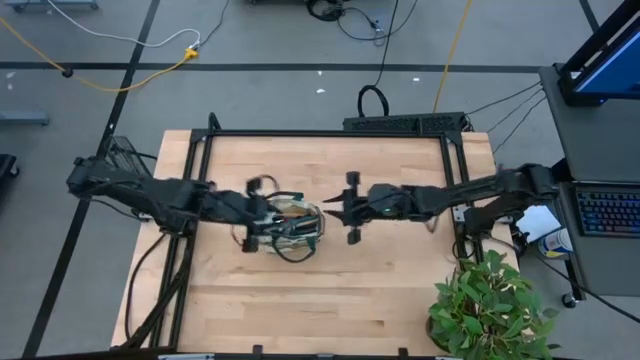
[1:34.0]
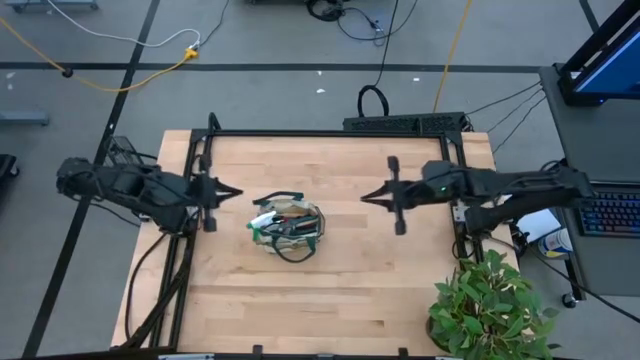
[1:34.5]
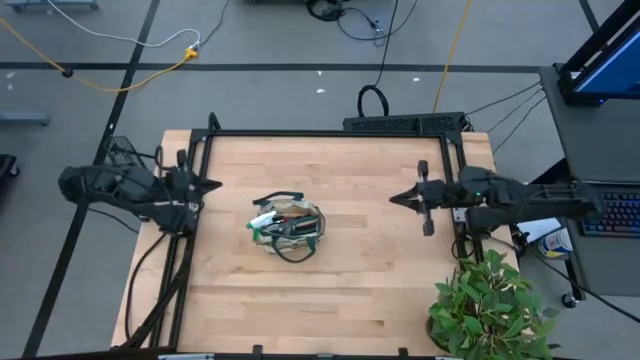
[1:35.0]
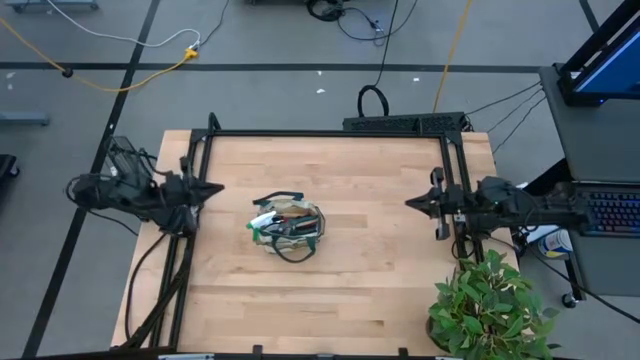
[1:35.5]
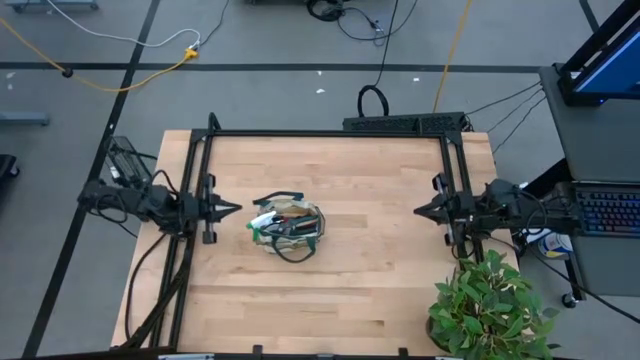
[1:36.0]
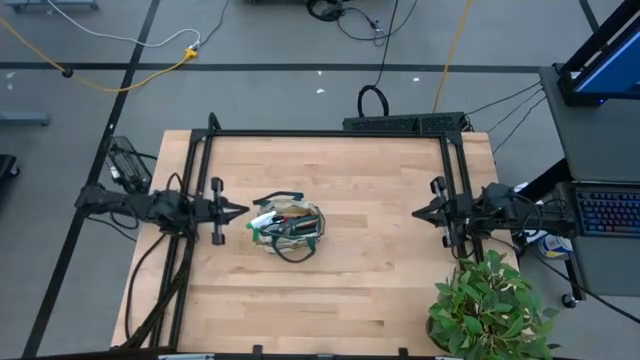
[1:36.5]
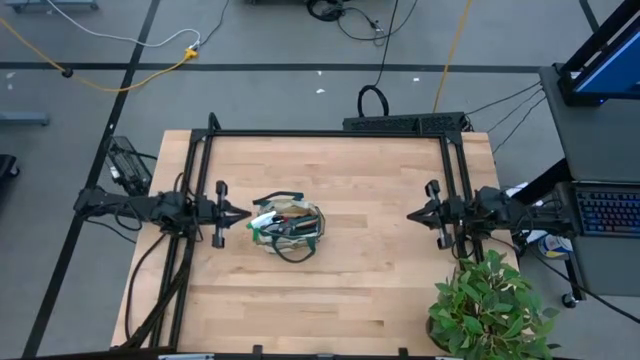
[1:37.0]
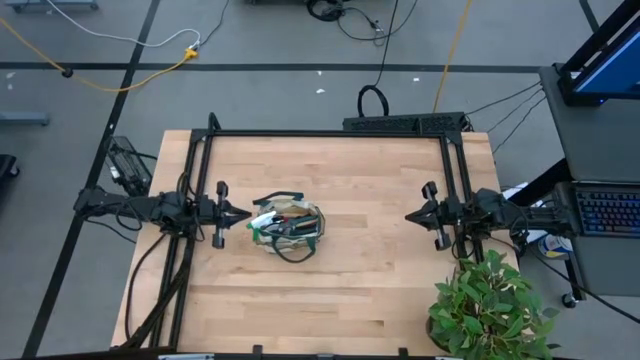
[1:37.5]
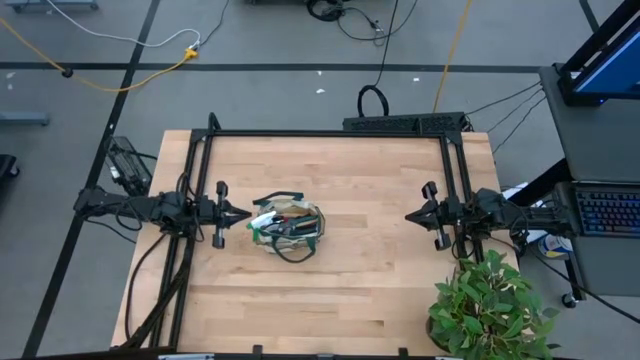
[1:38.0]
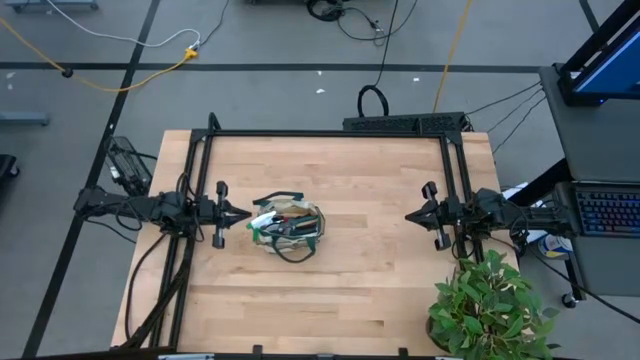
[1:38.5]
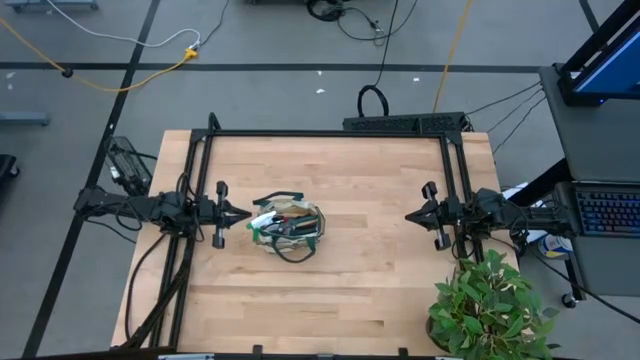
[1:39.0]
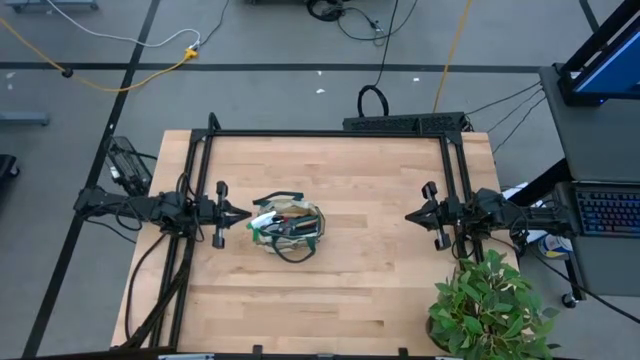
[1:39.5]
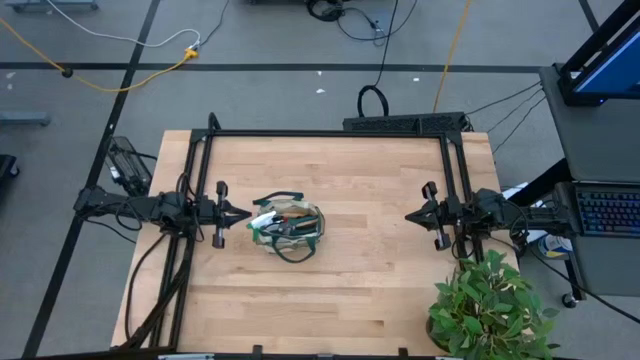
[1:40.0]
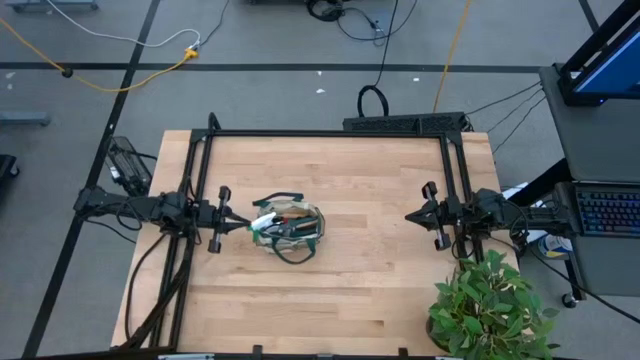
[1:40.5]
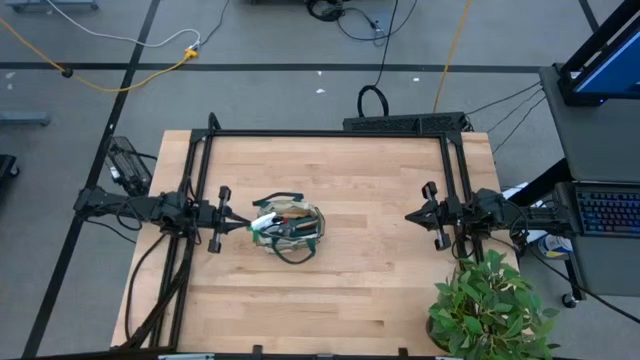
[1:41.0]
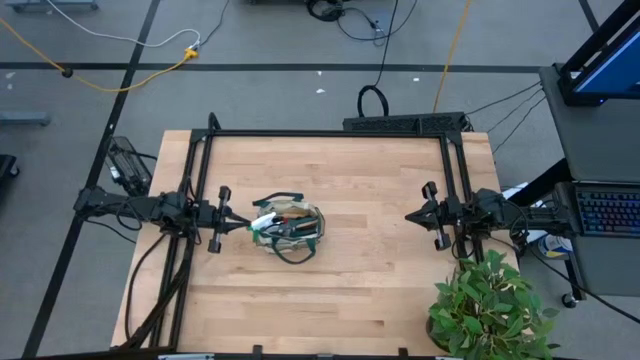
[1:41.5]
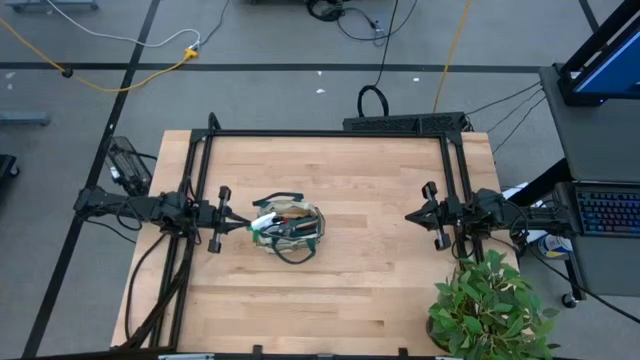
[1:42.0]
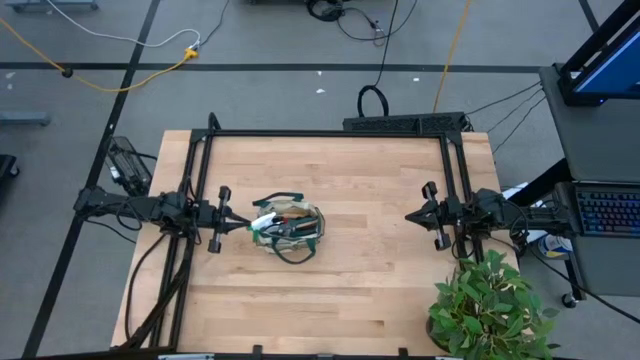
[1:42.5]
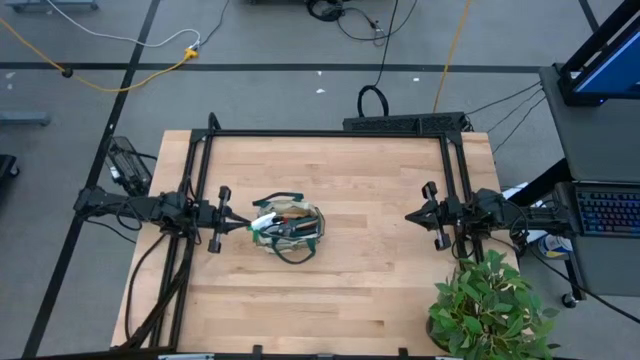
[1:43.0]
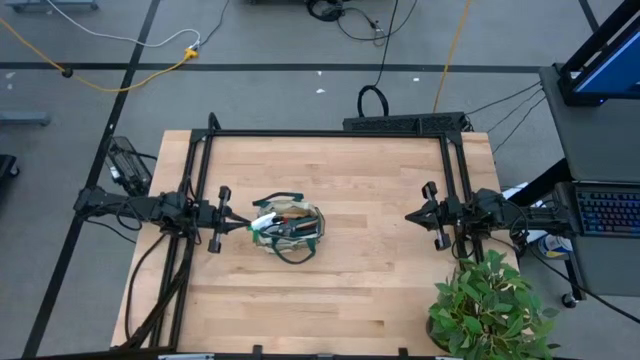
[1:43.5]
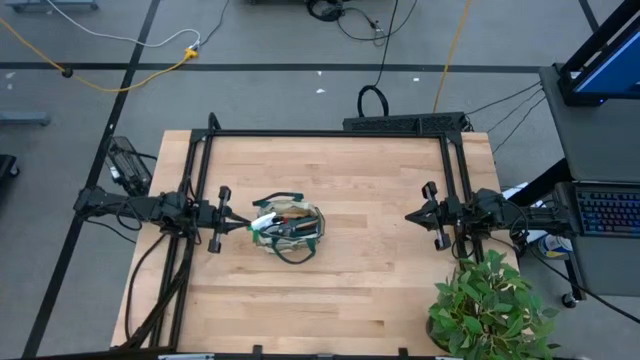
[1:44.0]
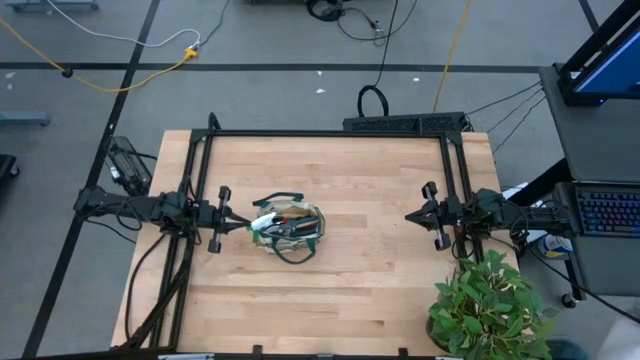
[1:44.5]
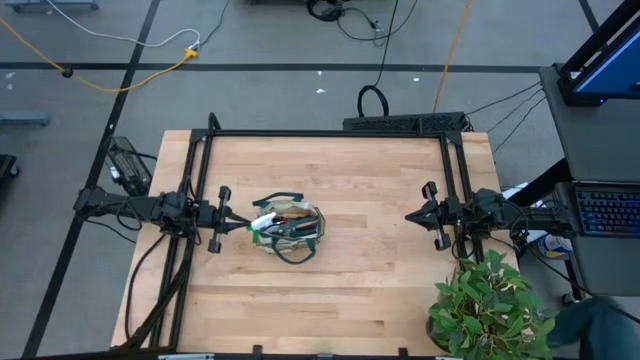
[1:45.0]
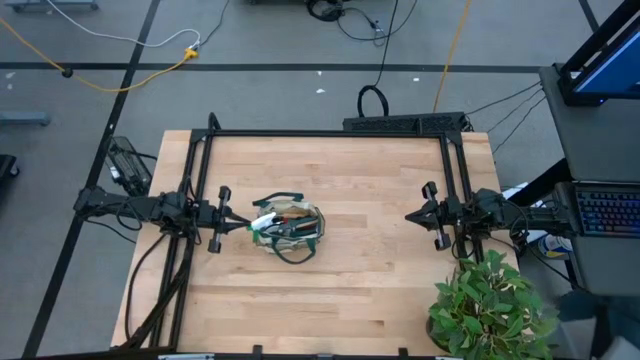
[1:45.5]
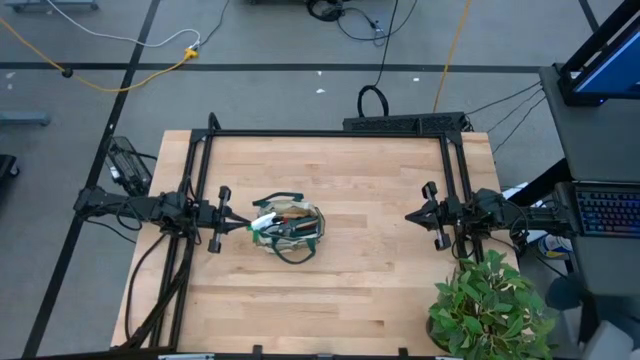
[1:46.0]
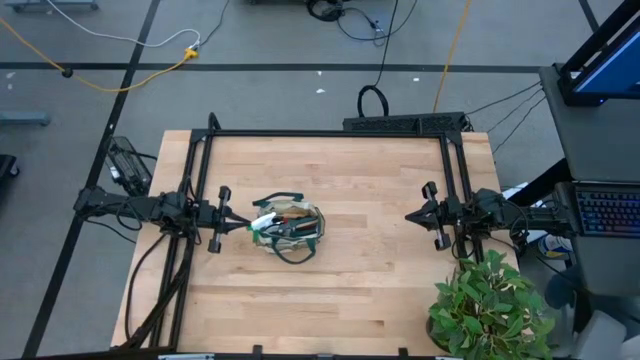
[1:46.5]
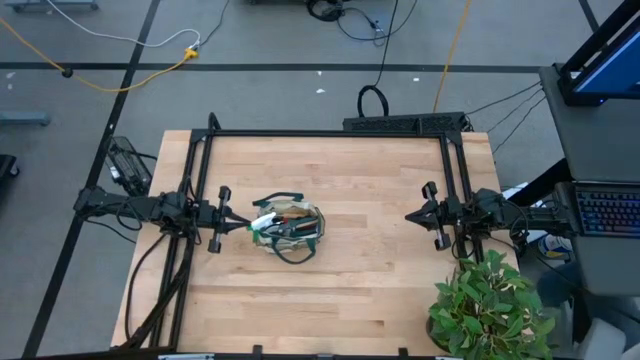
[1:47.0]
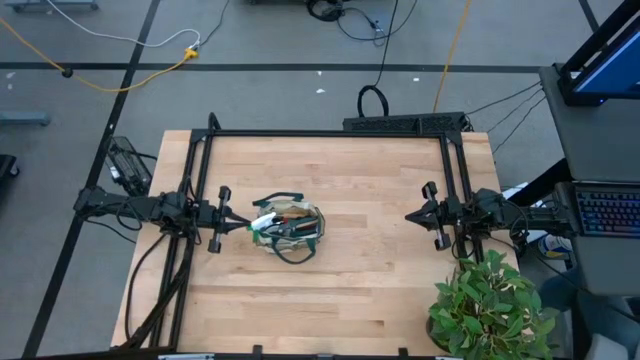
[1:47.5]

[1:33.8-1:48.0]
Task: Pick & Place Garden tools in Gardening bag
Return to Home Position
